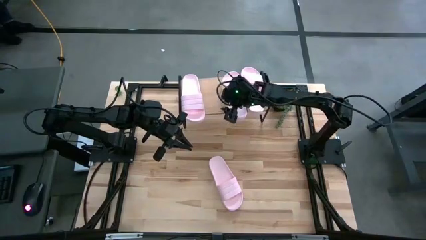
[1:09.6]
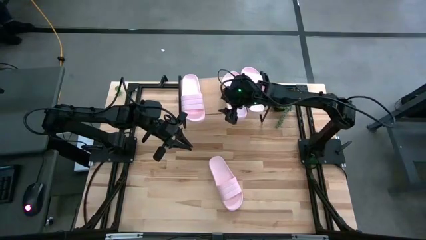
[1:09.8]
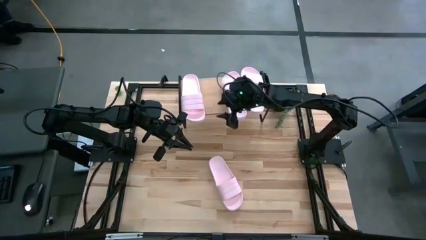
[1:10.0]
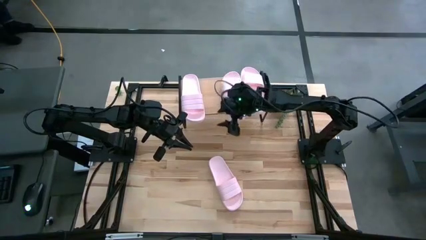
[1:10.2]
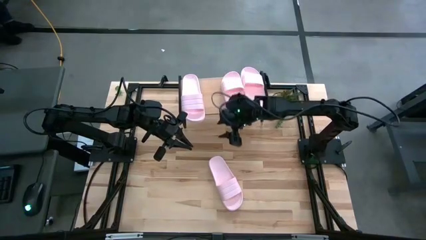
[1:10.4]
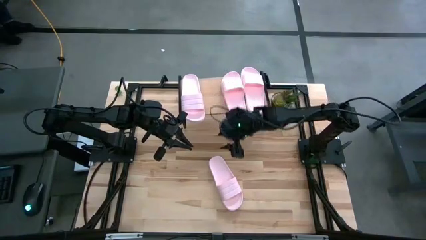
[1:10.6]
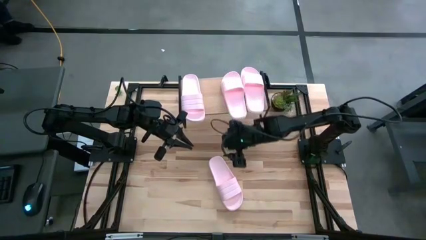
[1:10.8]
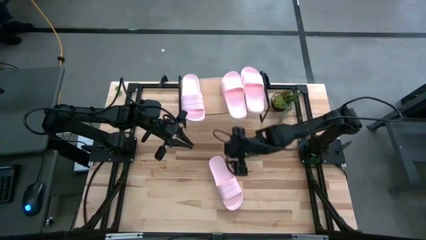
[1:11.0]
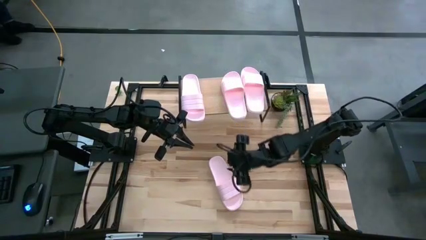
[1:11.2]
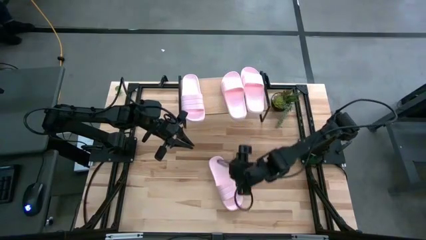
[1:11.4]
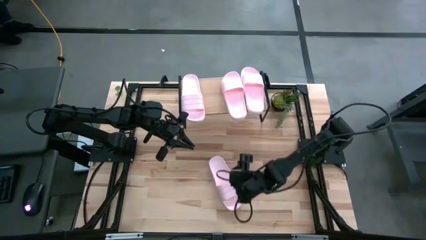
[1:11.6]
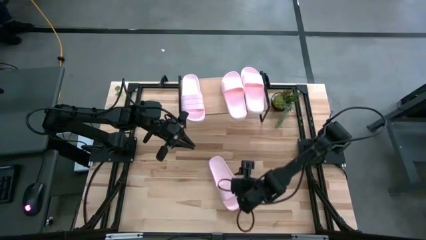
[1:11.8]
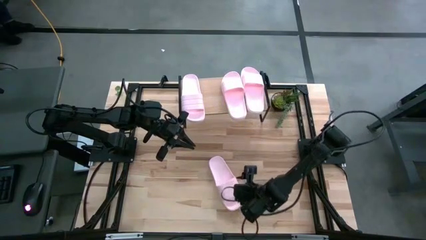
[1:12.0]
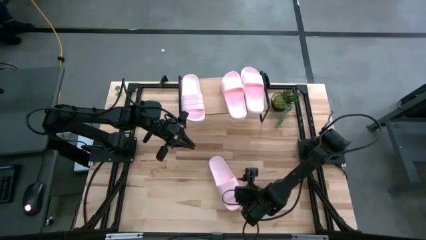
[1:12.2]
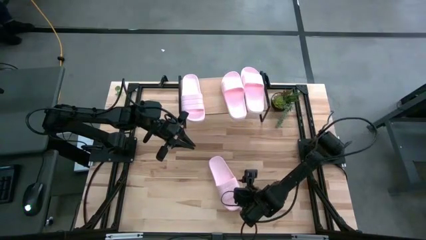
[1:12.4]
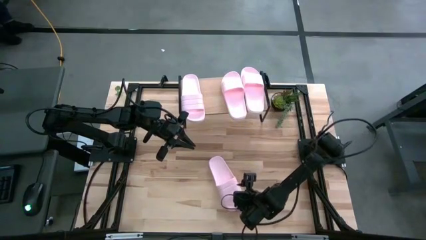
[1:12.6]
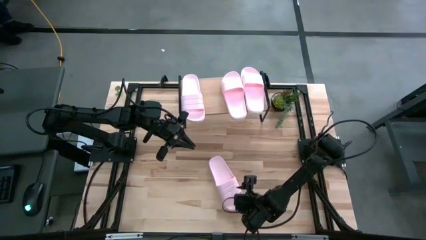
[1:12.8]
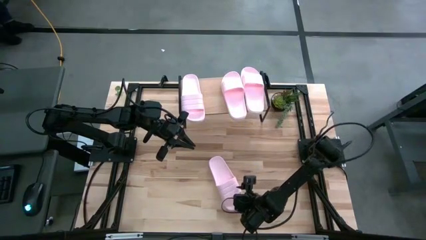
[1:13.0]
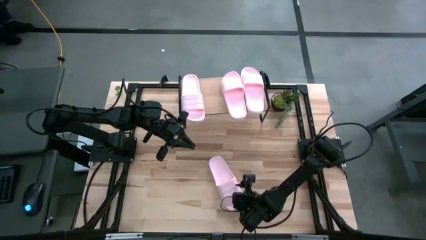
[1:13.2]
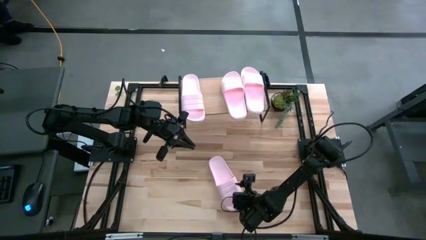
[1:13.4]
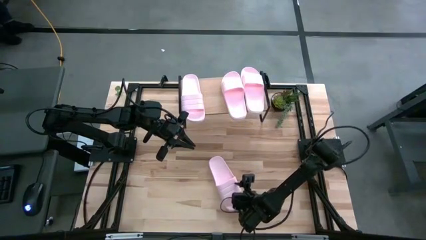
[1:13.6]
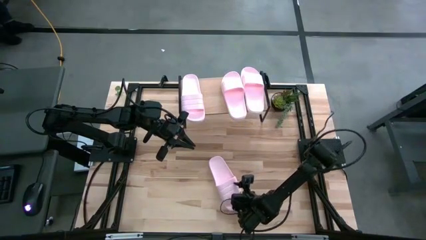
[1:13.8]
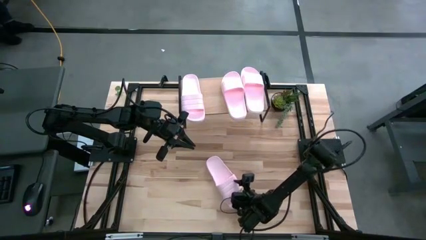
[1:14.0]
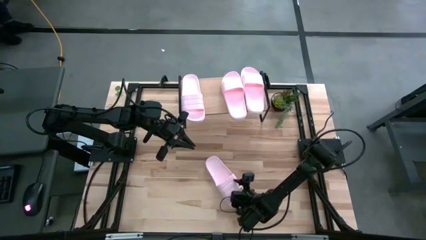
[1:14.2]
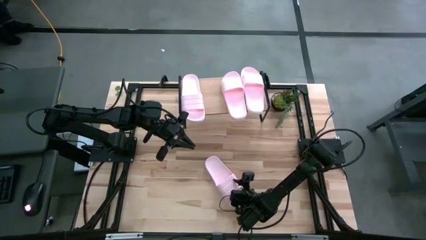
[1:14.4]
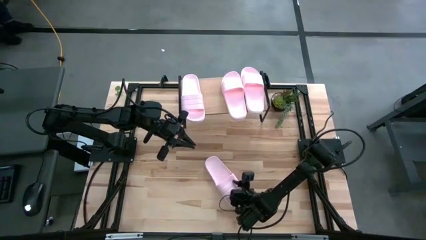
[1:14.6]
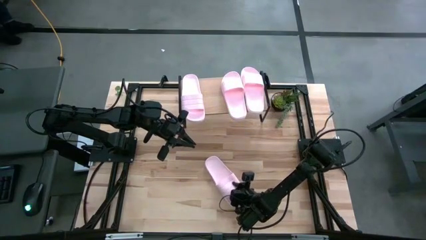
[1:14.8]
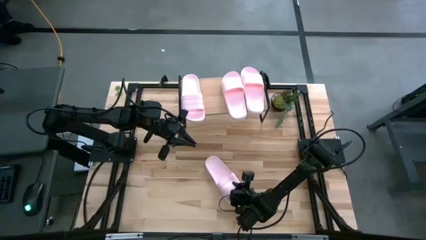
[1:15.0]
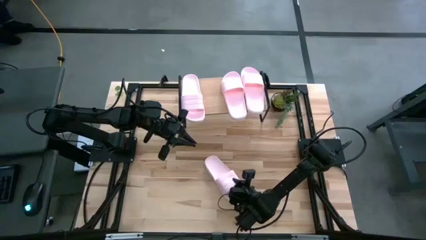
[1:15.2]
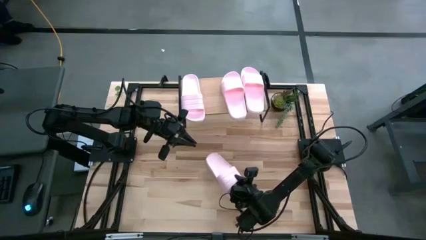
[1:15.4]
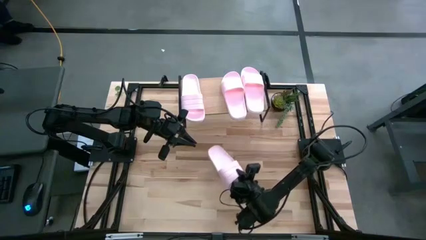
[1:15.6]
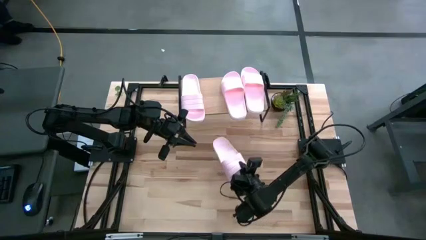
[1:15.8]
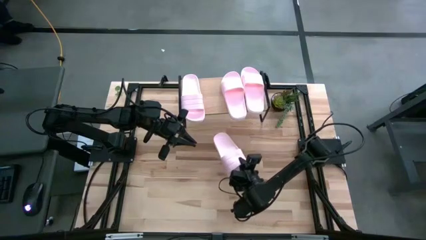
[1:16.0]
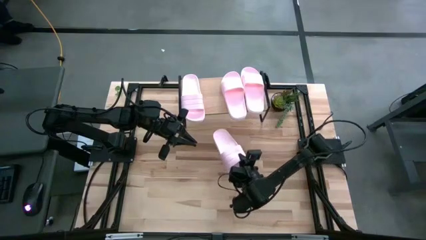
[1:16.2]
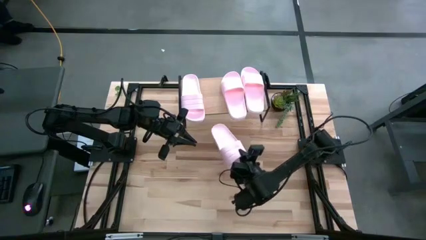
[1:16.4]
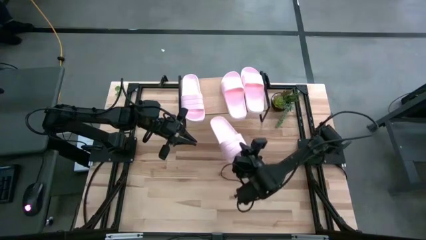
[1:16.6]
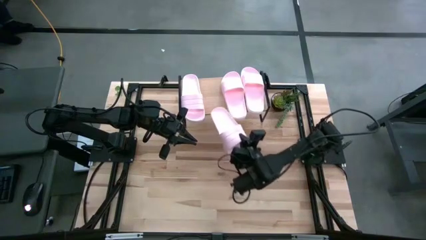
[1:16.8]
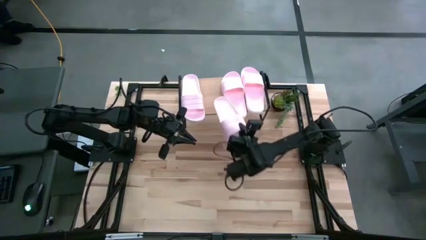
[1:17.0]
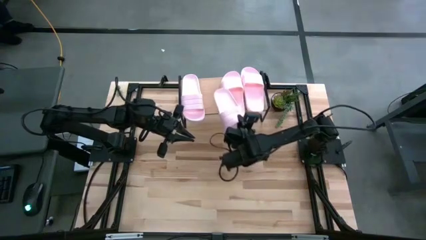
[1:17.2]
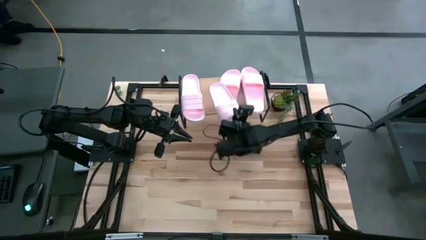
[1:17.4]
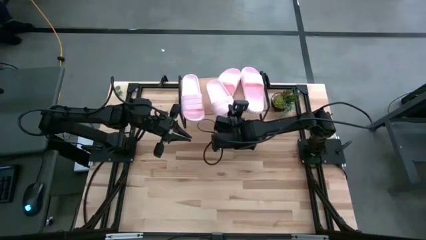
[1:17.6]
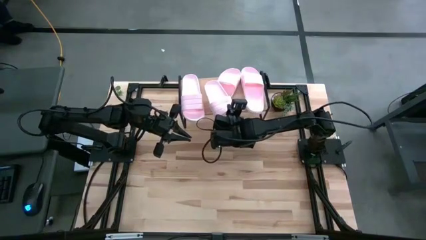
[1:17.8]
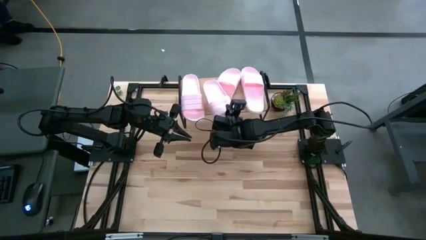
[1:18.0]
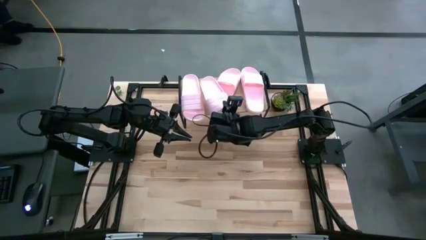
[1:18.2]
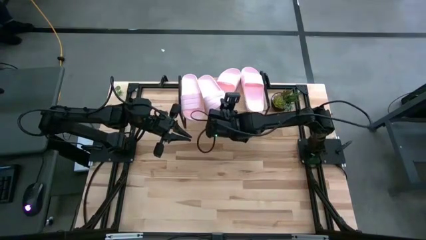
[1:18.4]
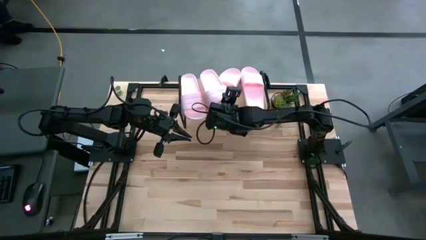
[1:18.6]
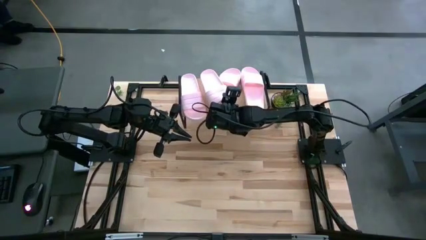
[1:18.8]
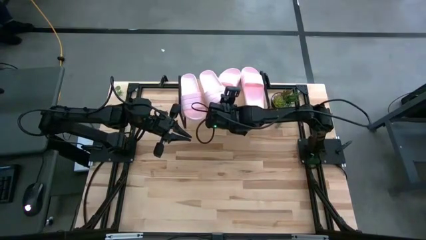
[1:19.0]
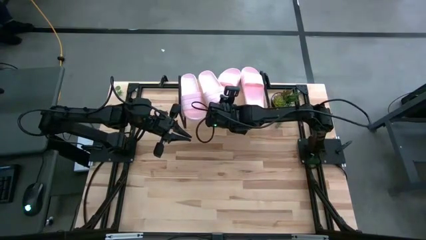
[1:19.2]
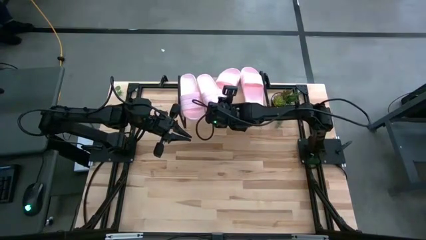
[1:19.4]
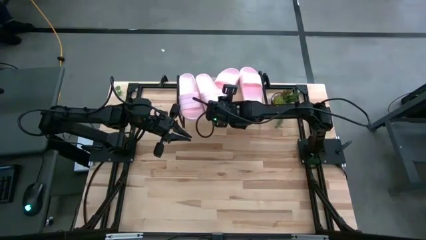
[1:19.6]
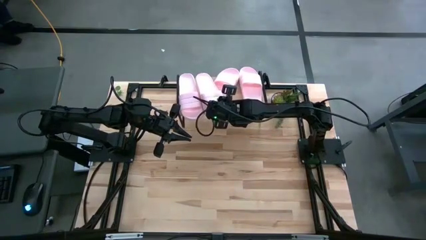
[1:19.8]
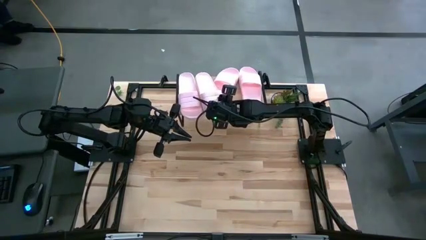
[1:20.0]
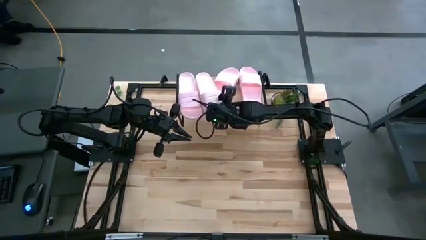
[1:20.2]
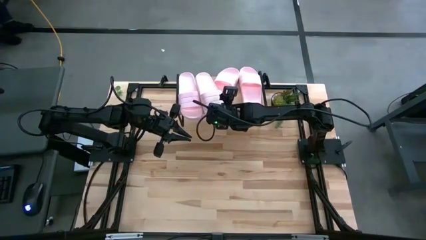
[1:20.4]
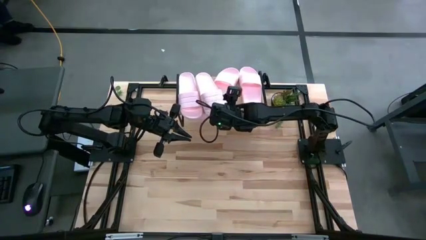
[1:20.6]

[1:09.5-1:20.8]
Task: Pick and place slides into the shelf
Put the pink slipper on the shelf
